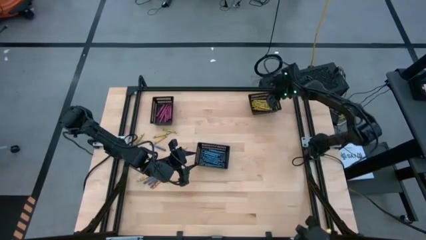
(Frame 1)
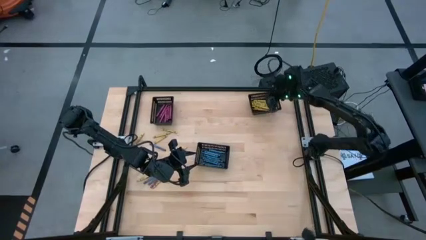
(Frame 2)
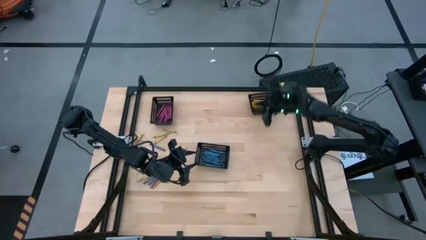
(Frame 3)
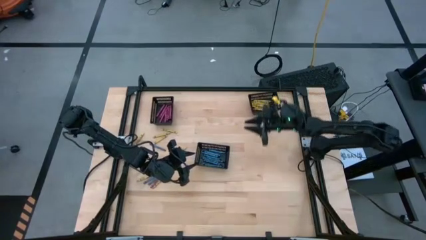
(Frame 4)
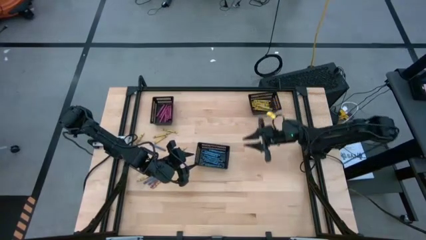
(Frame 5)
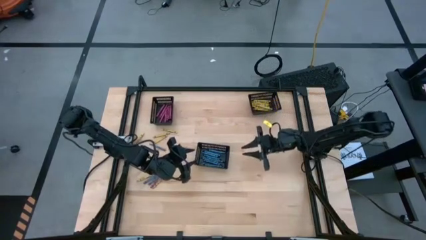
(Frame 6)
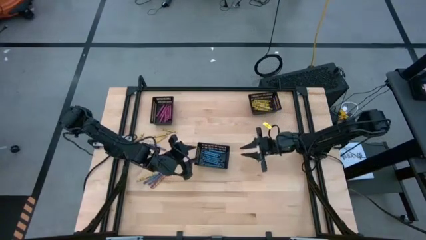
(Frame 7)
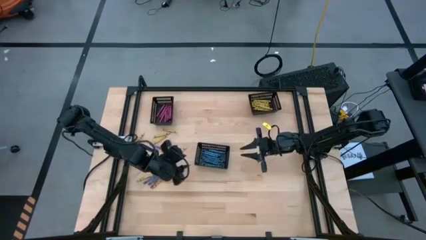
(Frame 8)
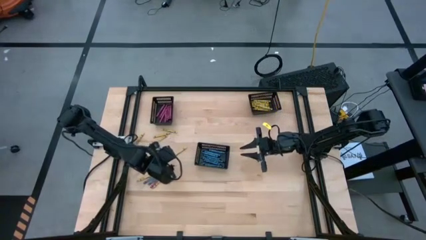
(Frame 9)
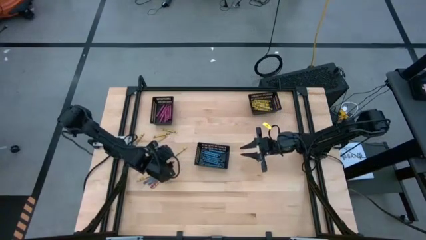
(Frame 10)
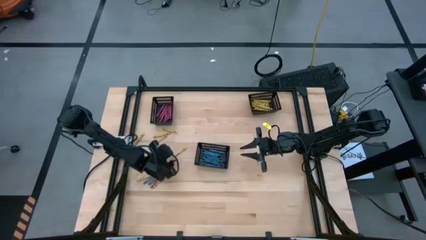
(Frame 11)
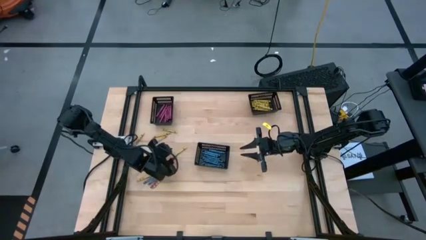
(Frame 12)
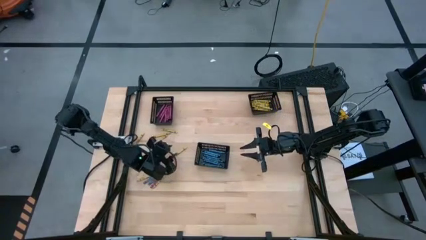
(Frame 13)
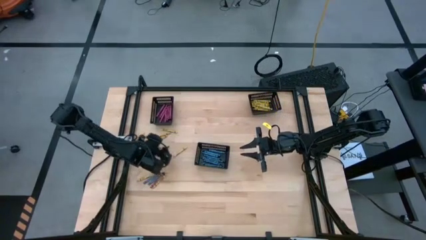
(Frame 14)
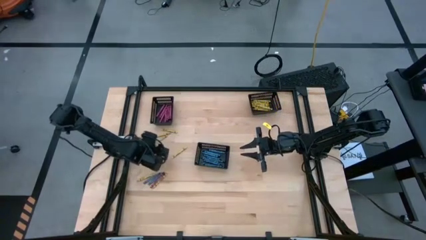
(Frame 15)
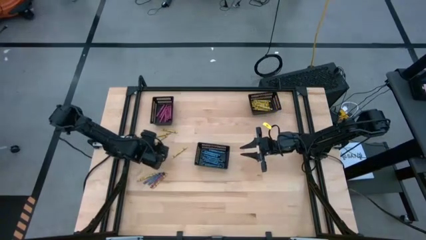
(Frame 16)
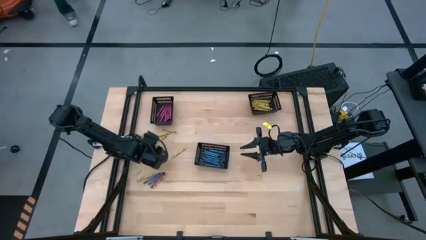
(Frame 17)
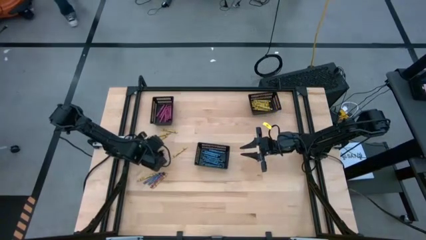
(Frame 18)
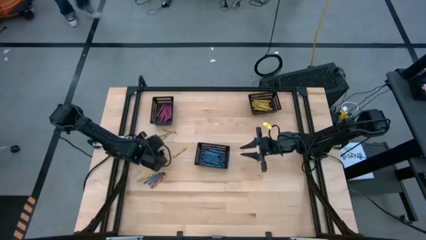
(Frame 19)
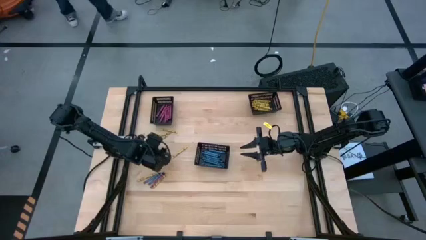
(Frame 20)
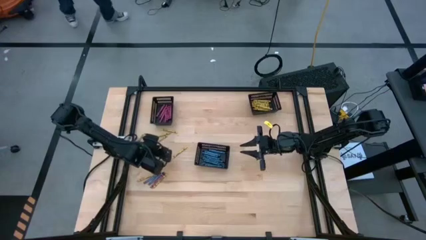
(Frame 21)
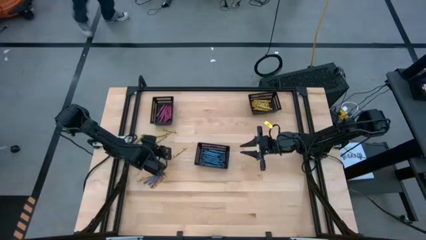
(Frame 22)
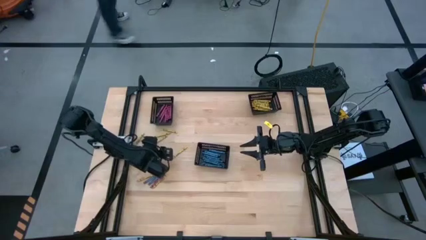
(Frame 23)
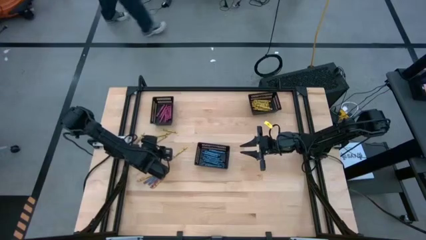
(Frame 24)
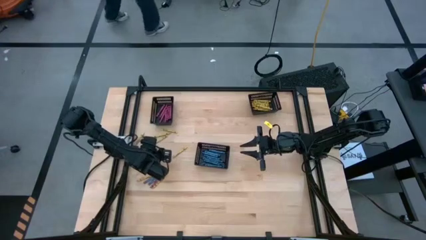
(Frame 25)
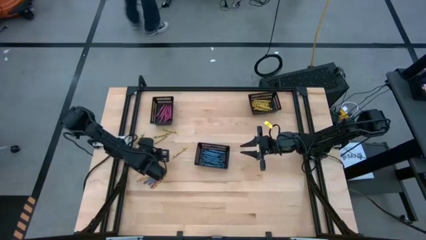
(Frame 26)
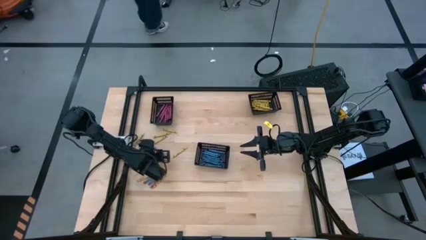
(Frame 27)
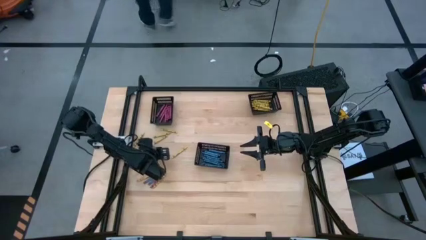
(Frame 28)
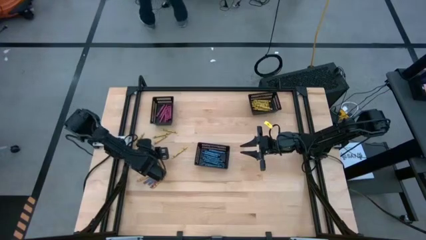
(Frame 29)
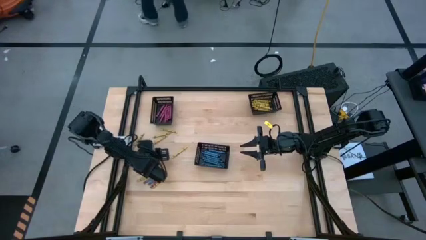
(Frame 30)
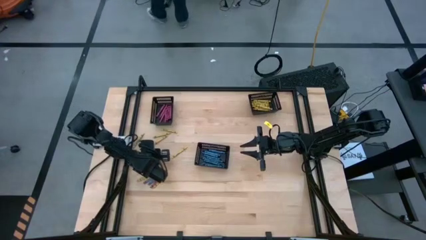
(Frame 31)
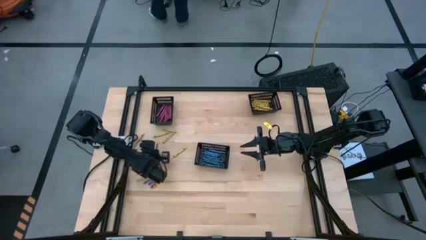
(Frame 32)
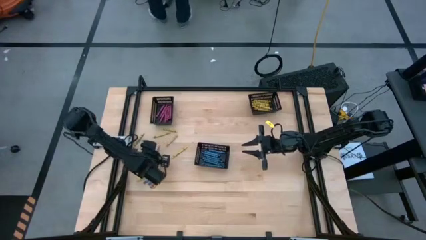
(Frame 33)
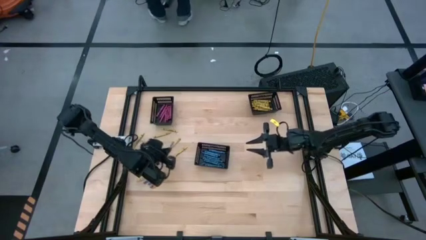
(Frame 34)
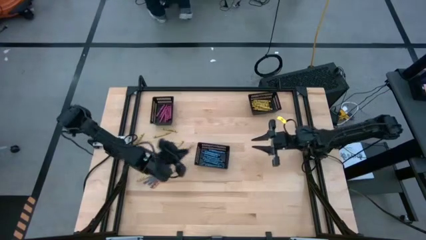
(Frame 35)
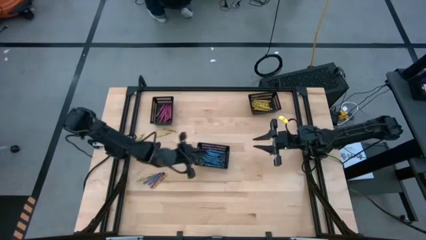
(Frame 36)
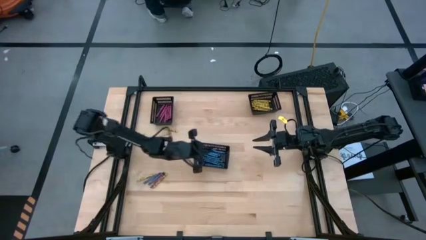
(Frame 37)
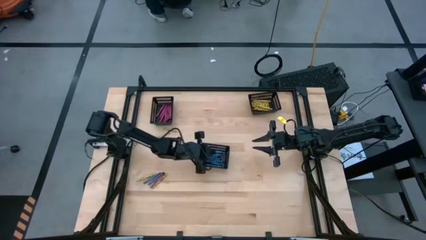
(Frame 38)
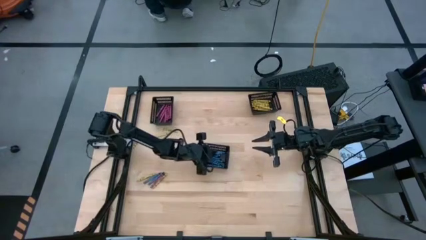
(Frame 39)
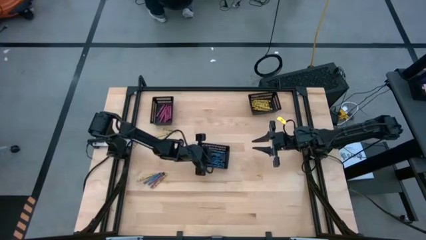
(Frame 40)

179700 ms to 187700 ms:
Task: Sort crayons
Put the blue crayon into the bottom black bin

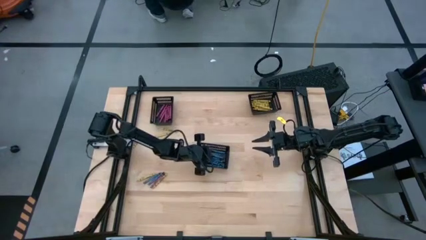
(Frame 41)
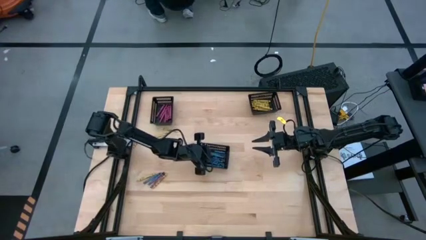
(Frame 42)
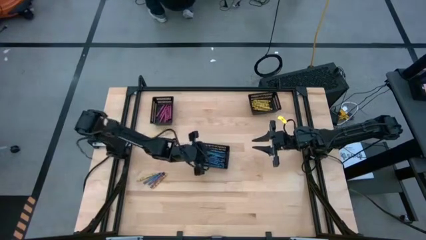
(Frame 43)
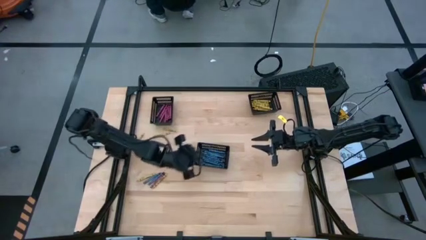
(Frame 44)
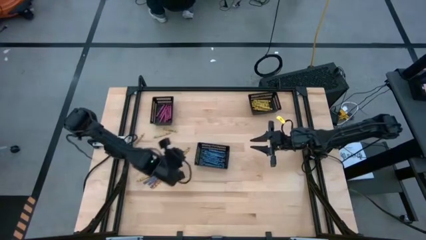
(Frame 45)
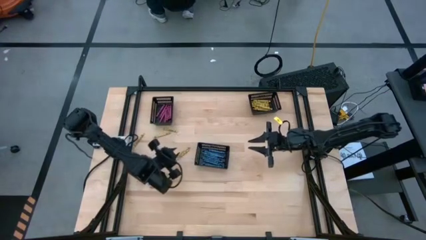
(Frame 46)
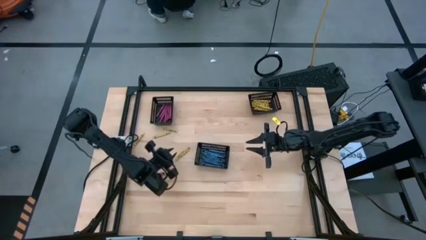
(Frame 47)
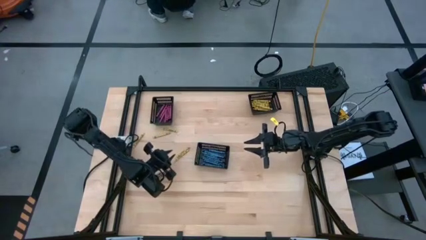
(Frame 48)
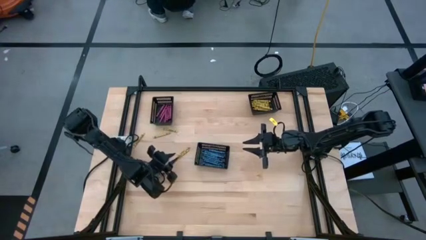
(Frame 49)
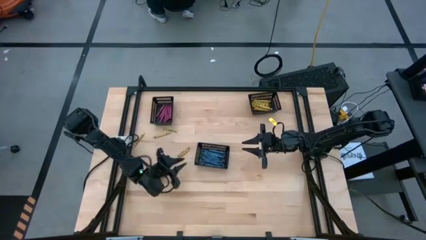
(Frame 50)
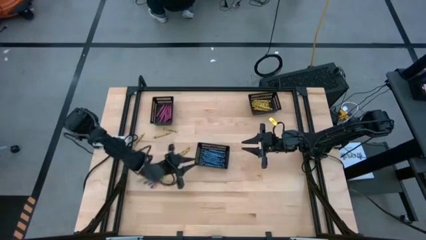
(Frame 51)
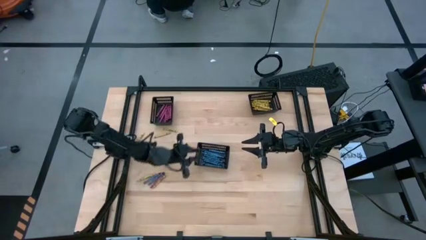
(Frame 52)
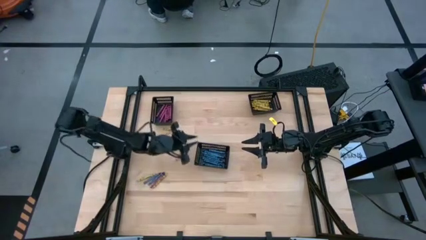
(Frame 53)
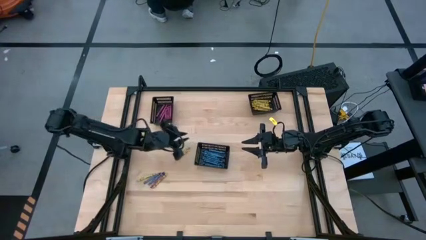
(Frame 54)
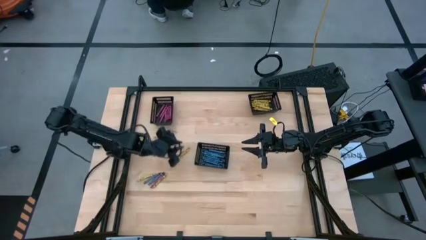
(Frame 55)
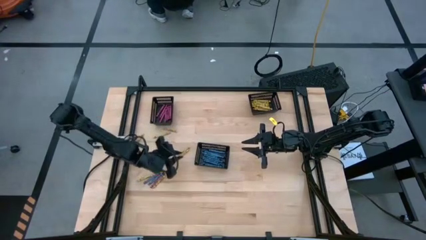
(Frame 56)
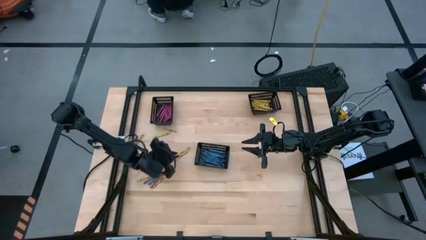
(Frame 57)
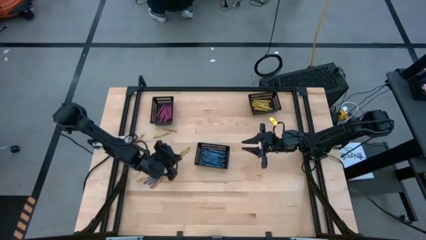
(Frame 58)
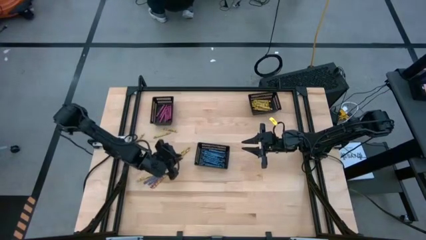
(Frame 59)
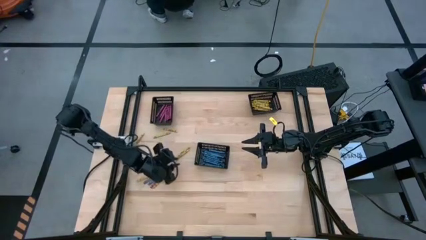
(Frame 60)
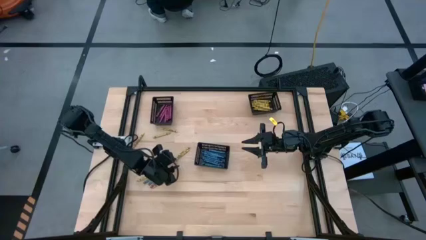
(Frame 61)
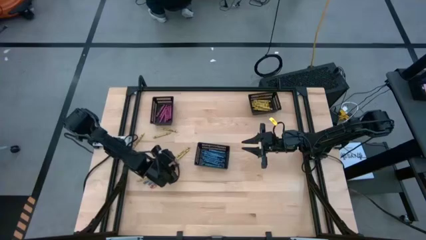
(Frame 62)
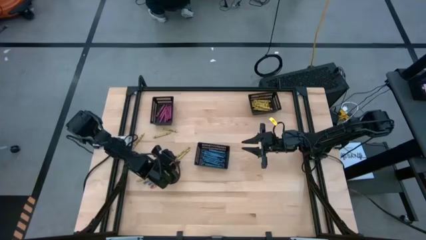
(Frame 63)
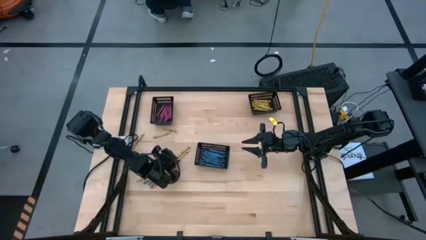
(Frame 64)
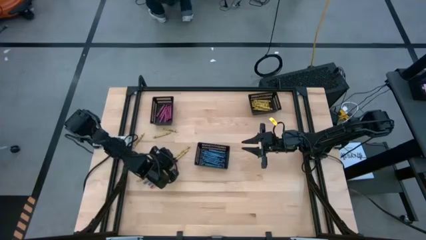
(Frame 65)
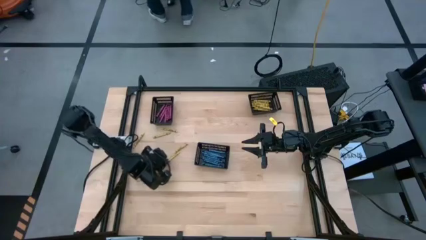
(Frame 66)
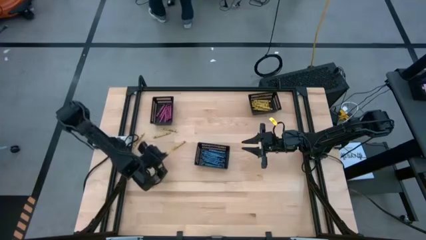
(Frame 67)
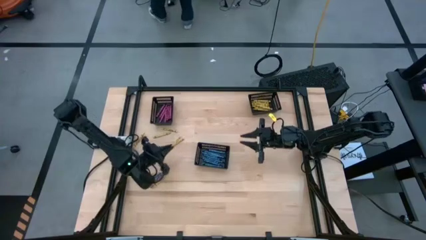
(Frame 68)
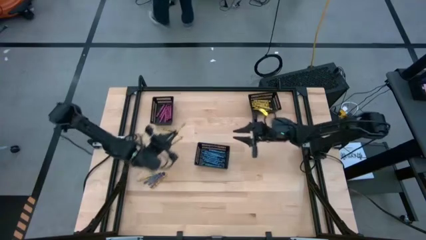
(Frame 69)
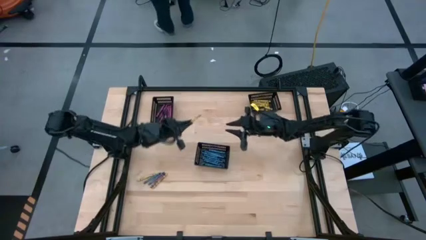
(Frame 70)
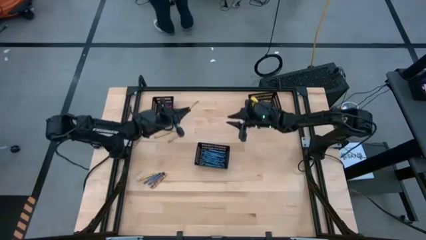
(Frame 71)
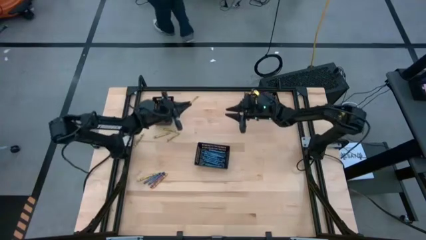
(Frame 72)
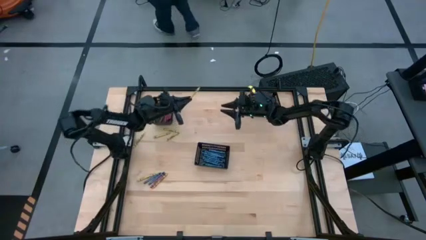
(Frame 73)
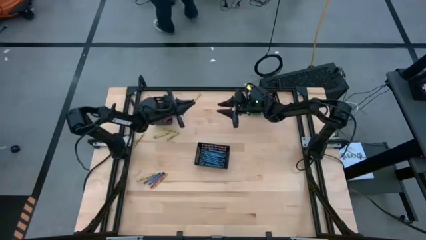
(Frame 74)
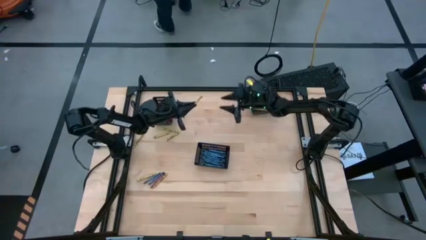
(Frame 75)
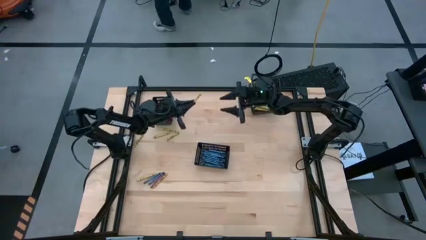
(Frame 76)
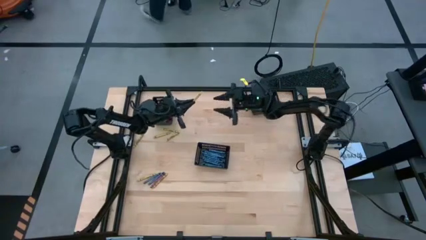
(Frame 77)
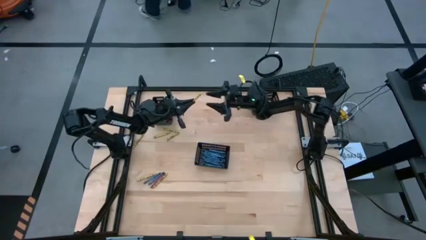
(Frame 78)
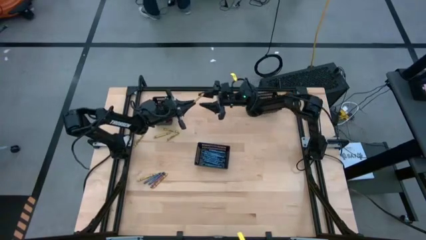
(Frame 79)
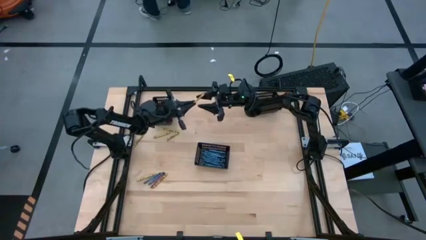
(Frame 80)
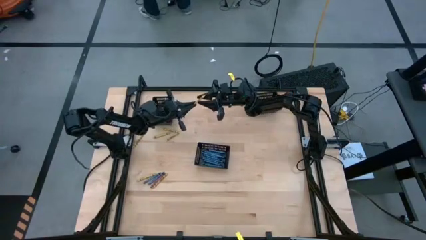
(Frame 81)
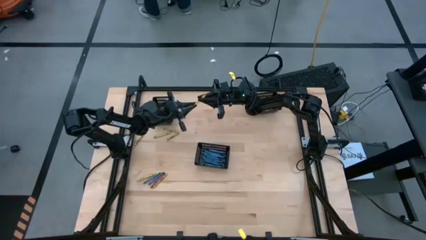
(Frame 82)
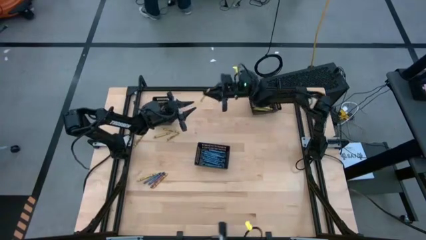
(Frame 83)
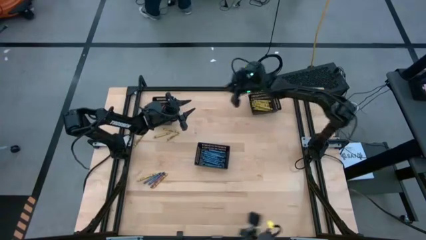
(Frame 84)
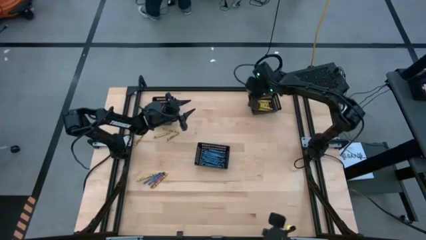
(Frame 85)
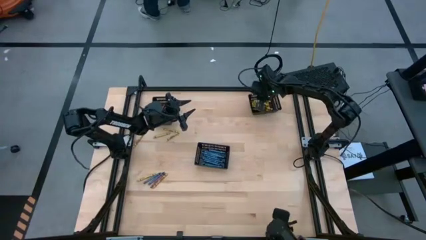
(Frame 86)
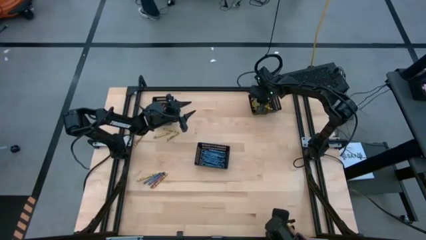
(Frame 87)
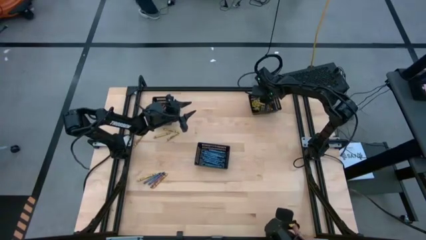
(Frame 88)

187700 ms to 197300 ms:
Put the yellow crayon into the top right black bin
